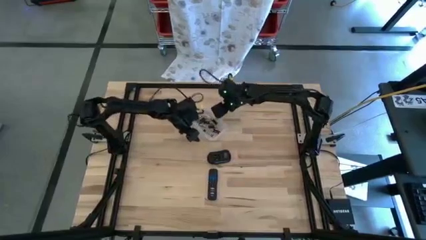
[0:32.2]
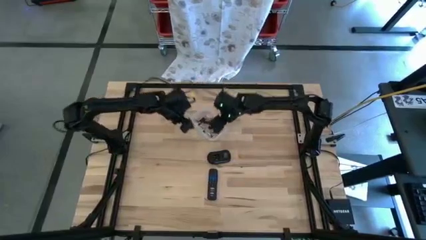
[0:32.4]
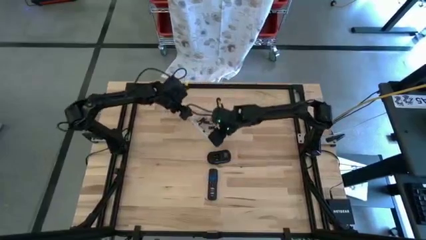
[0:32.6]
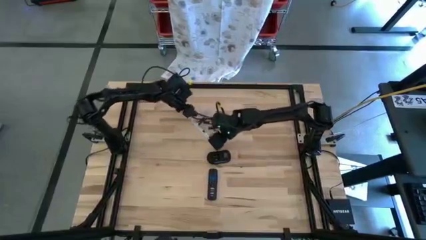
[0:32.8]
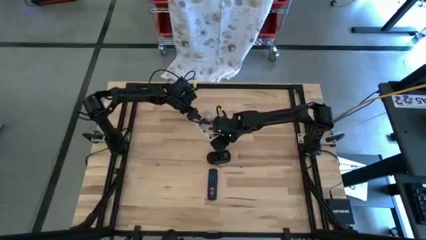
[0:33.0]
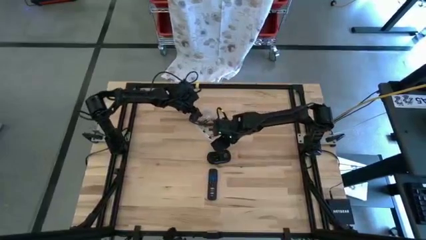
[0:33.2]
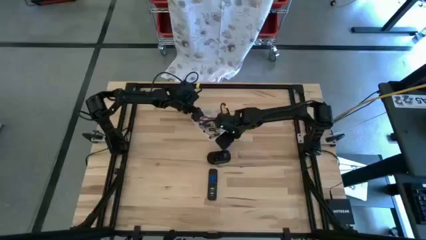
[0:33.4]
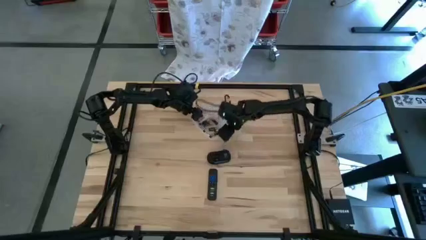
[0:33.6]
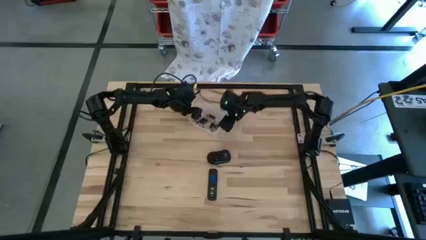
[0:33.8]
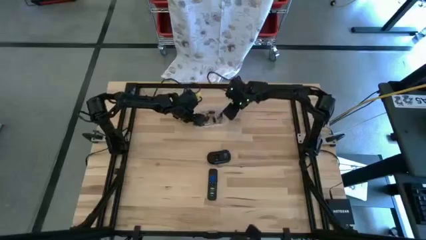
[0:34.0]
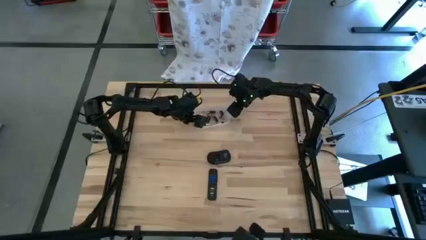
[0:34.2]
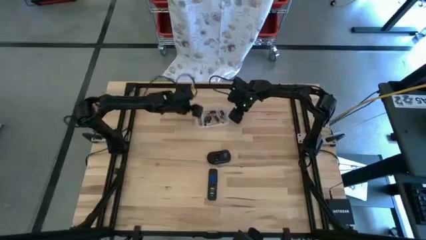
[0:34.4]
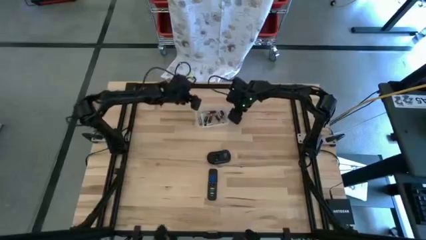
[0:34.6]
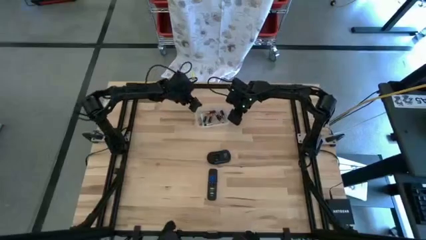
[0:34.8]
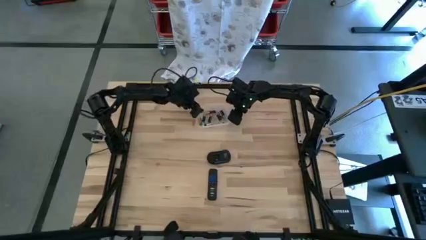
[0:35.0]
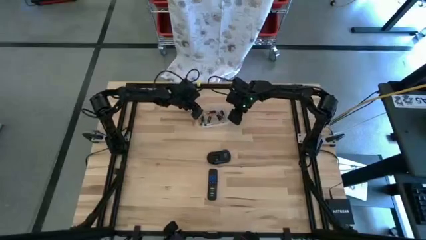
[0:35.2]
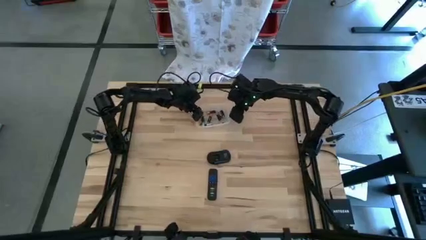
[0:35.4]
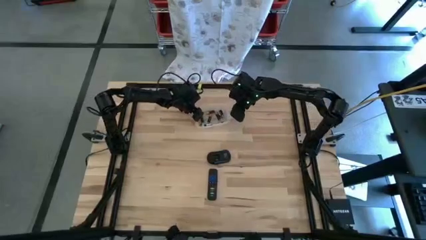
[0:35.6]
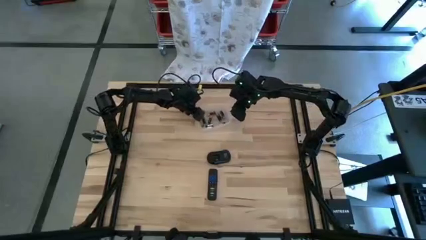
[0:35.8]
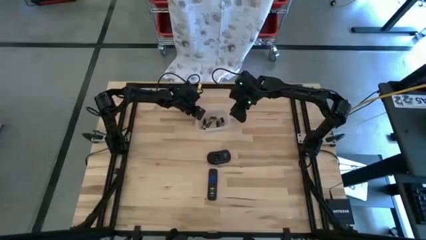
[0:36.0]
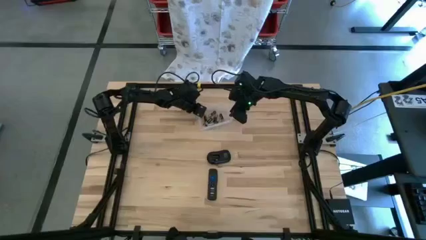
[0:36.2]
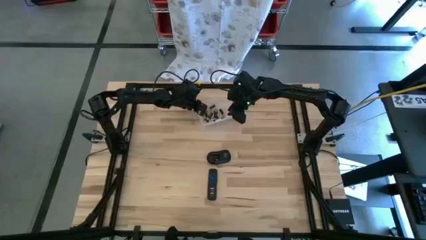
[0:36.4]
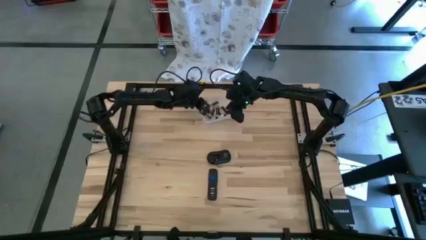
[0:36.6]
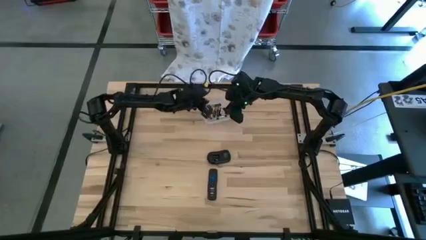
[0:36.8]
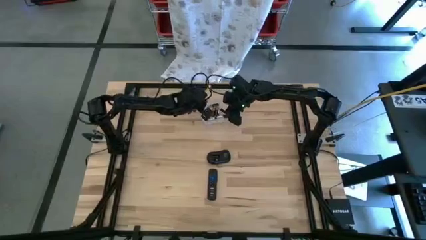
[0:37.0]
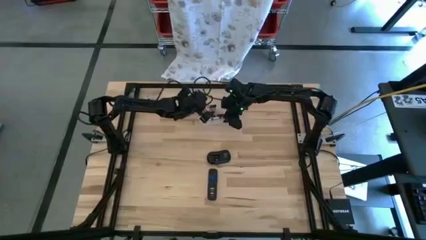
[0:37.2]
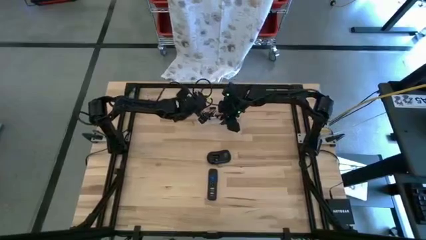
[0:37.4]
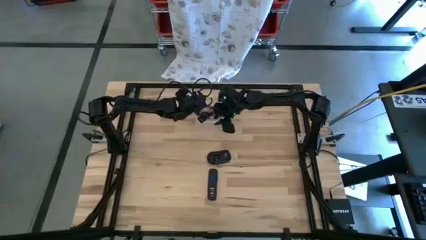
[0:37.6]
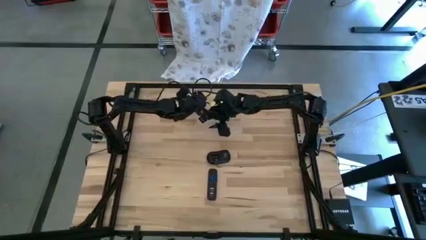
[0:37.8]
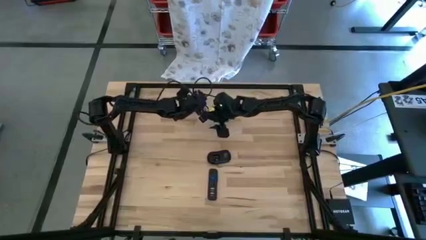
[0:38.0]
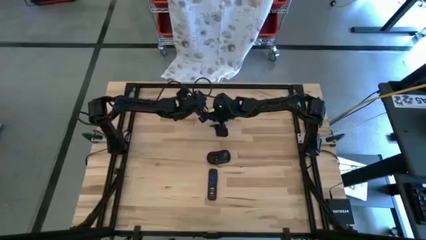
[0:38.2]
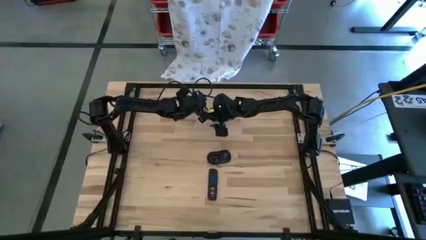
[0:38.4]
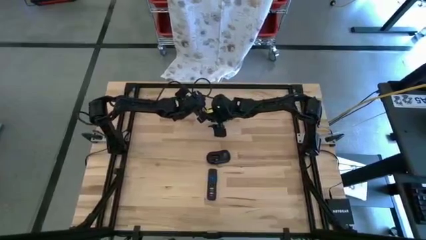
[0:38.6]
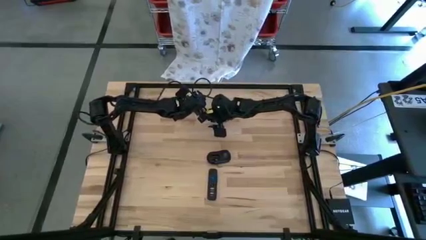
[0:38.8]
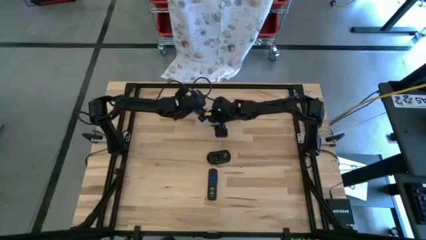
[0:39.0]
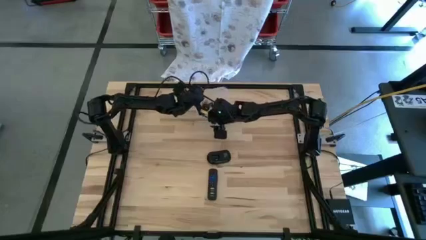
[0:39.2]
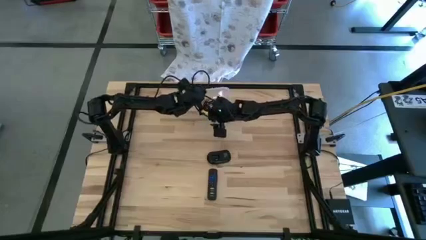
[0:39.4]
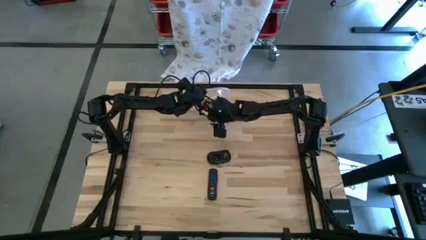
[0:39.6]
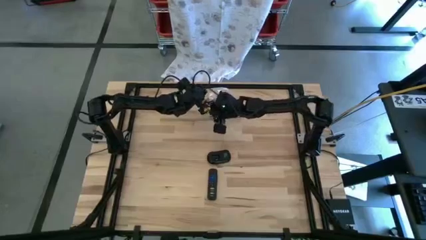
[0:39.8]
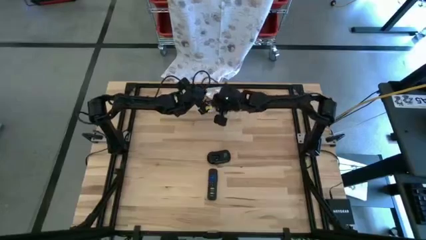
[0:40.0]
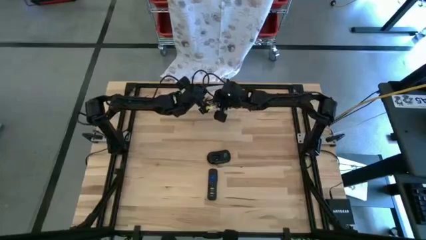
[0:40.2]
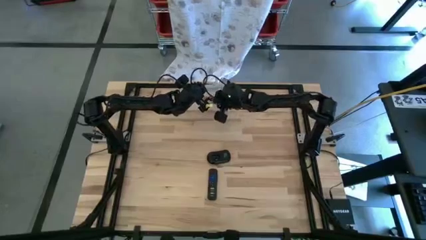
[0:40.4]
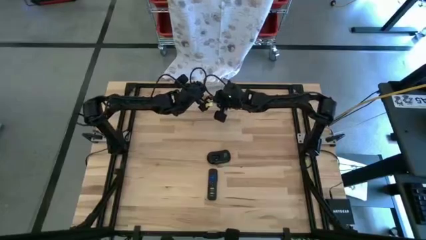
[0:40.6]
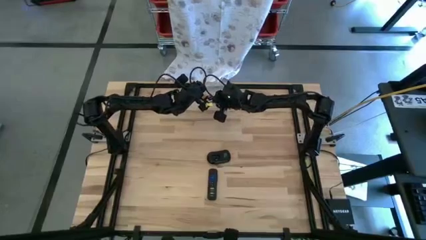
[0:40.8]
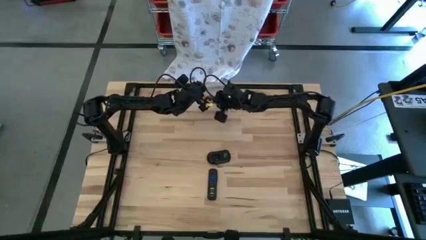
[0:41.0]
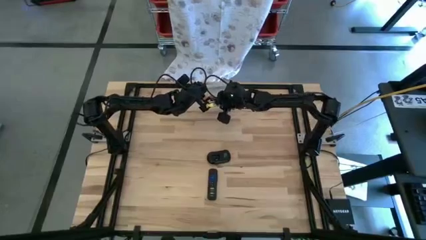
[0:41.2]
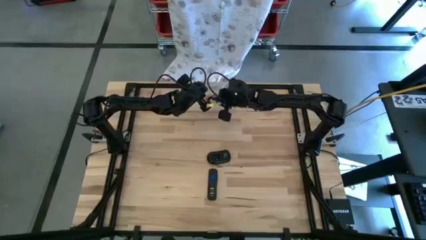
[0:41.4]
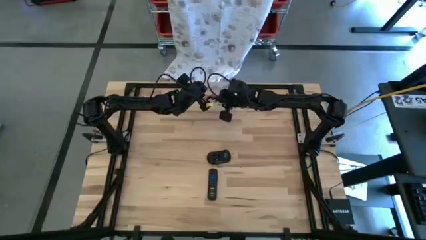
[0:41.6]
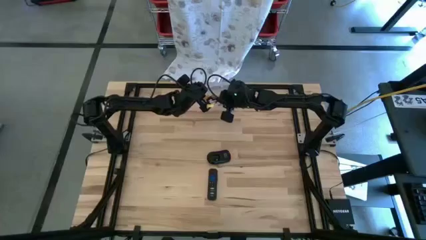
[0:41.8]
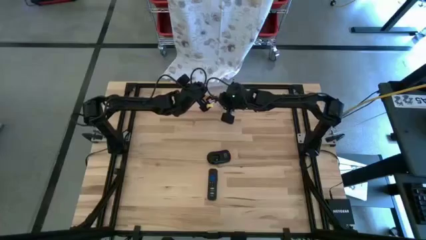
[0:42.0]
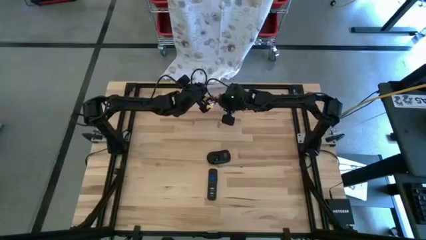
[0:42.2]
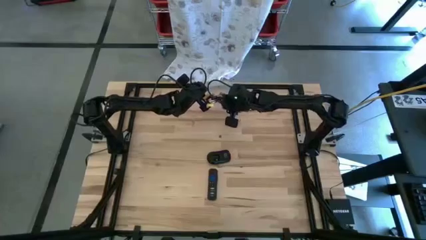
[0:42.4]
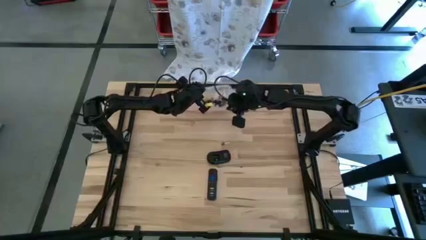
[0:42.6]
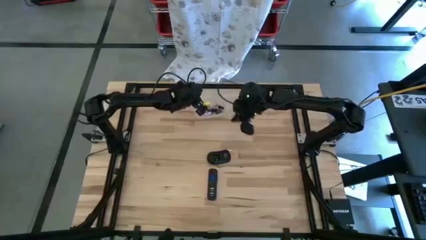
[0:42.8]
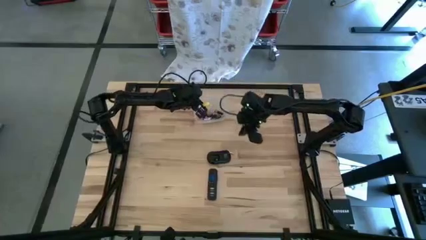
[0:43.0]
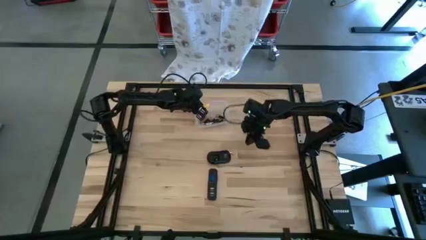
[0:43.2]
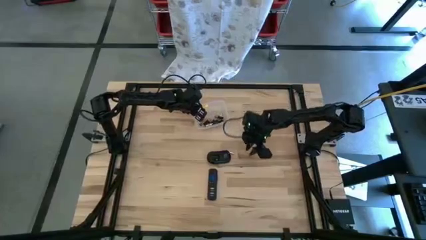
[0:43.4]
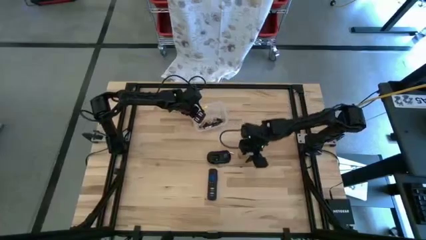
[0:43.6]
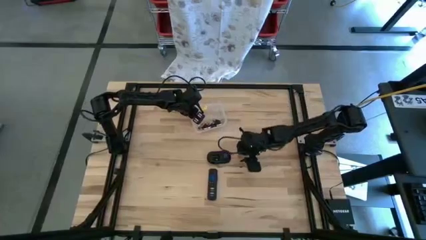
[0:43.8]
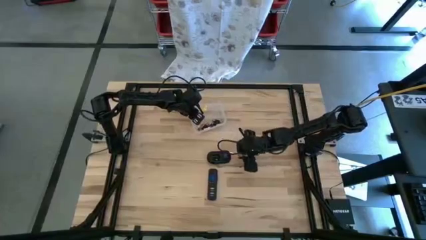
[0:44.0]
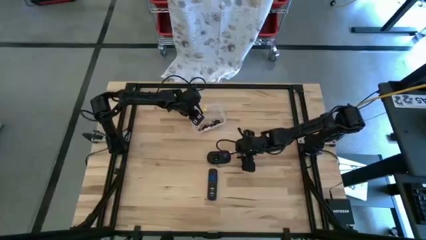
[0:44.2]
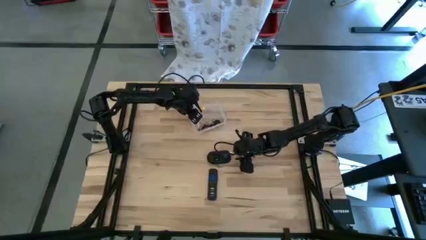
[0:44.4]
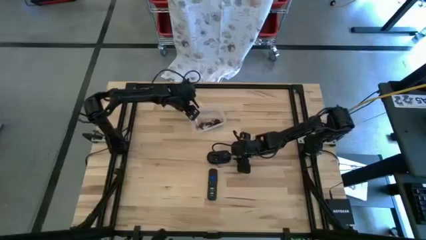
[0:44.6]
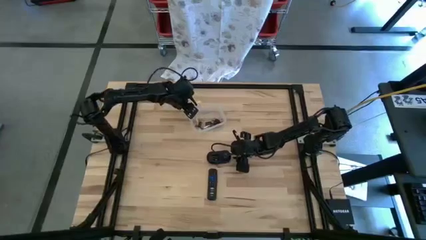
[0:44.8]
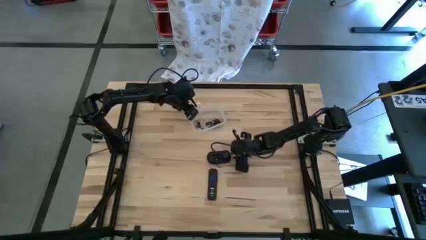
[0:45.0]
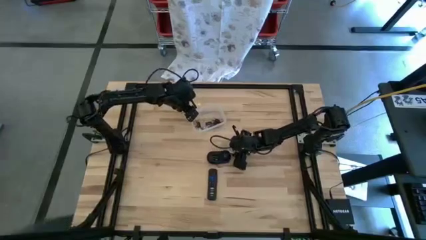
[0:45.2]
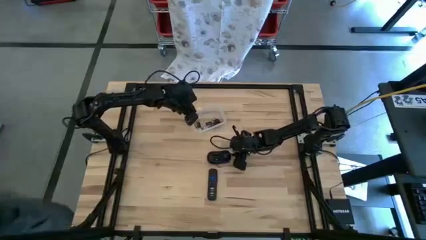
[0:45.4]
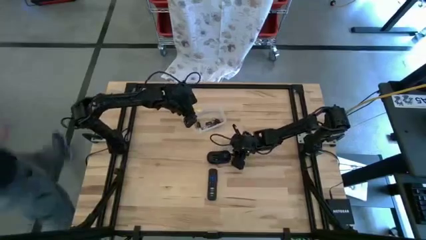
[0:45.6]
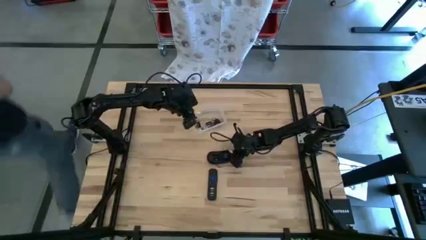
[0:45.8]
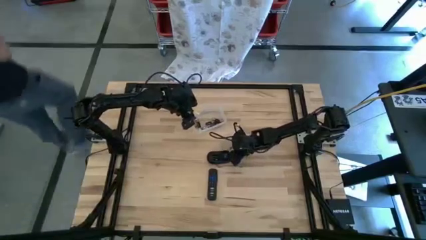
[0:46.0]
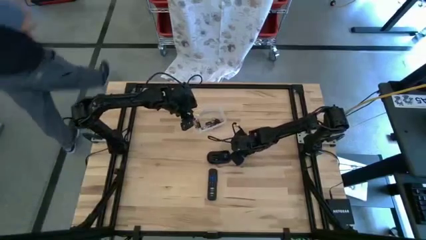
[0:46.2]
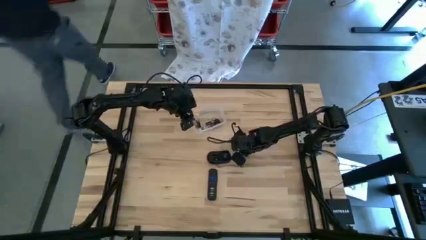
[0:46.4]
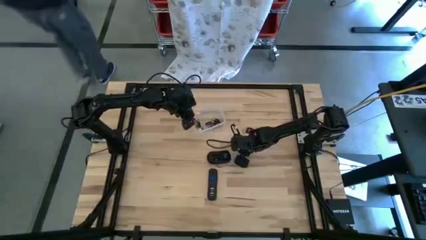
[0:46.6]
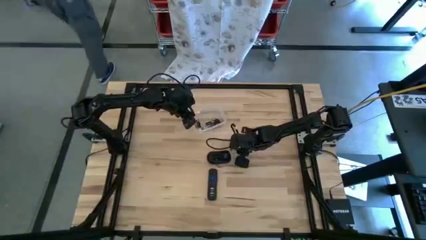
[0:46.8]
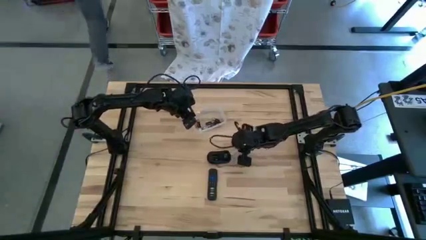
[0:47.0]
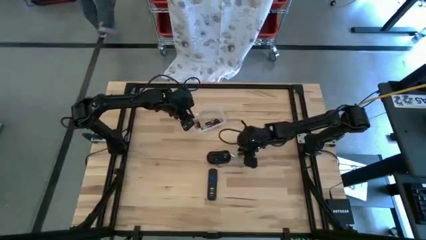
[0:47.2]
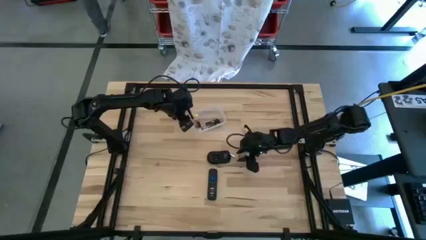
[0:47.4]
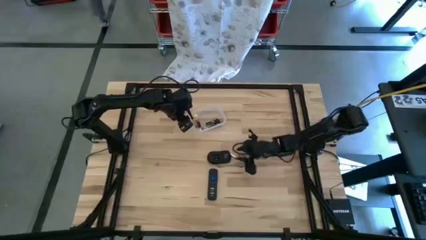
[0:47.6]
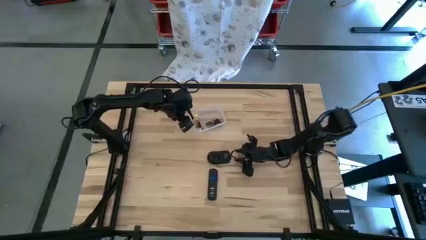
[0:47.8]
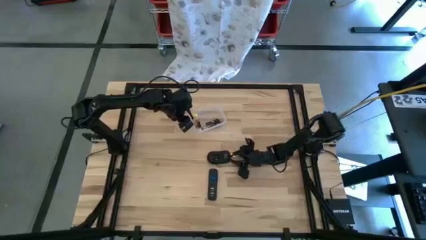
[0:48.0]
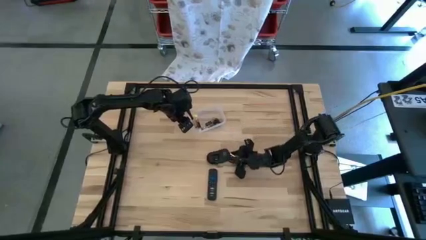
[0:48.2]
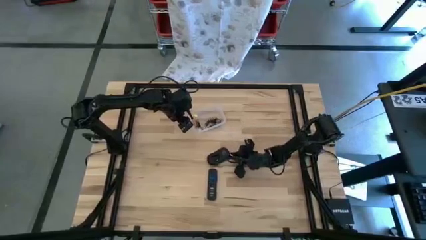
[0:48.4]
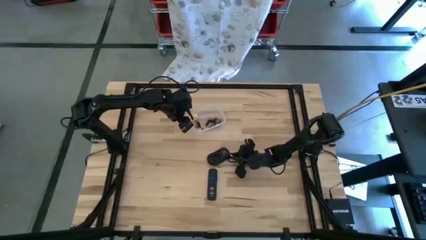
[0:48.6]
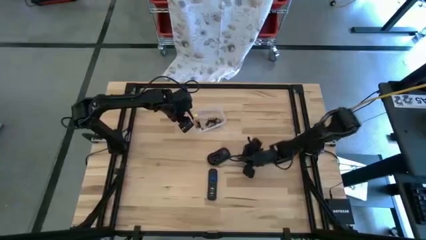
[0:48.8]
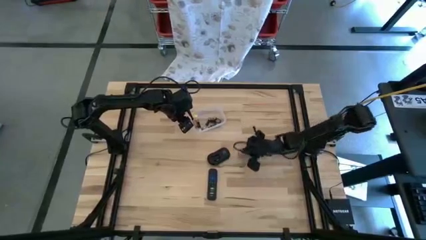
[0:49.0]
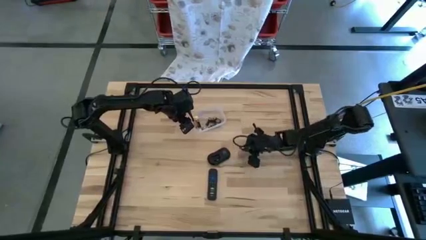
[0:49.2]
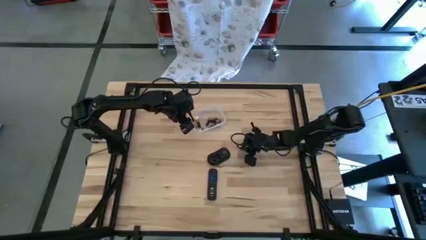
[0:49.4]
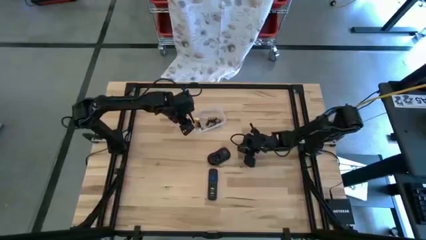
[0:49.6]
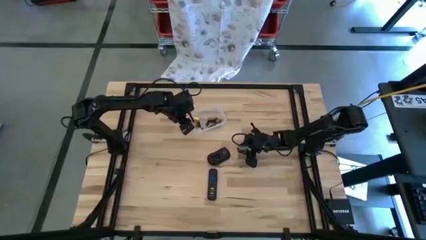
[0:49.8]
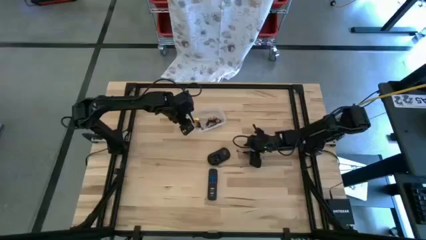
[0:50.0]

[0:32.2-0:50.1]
Task: Insert battery
Insert the silver battery into the mouse
